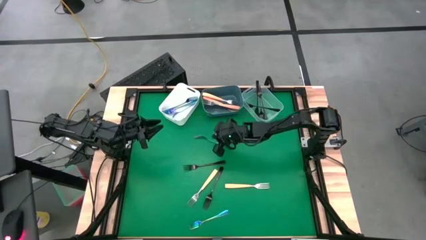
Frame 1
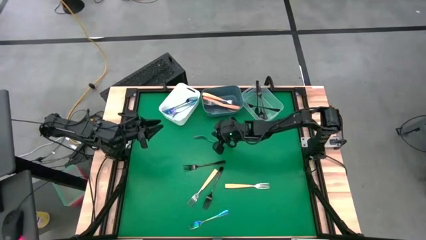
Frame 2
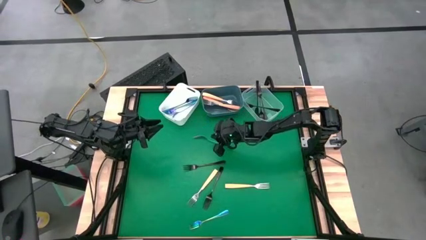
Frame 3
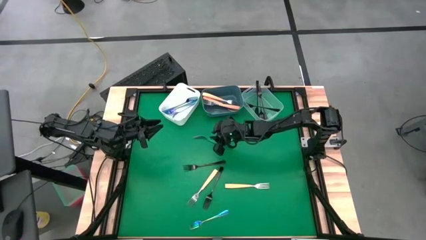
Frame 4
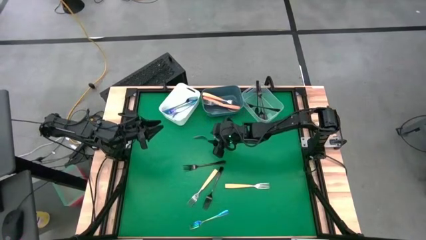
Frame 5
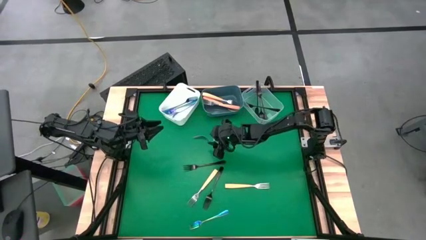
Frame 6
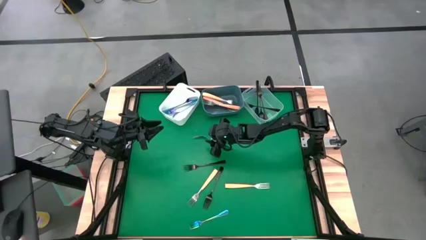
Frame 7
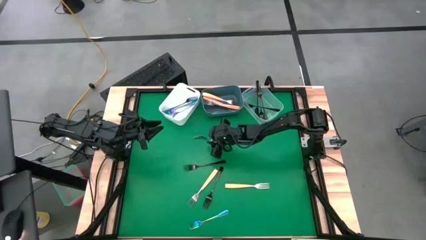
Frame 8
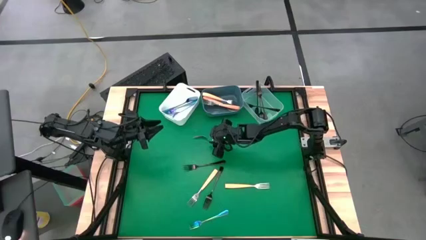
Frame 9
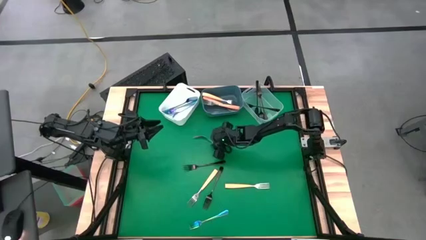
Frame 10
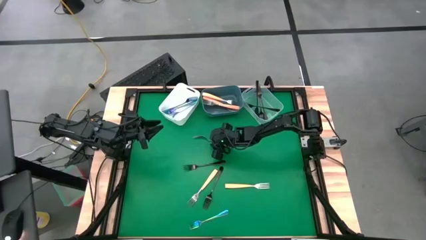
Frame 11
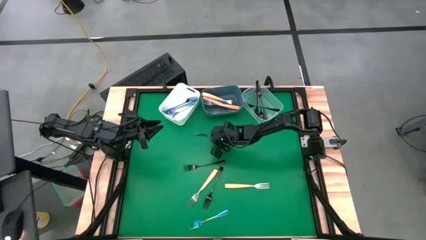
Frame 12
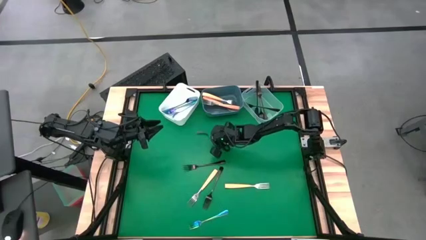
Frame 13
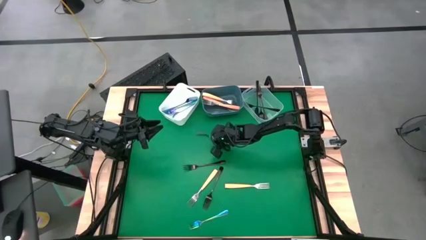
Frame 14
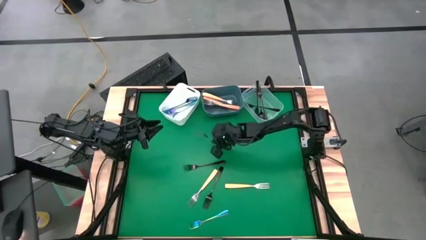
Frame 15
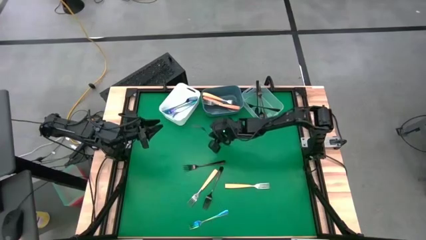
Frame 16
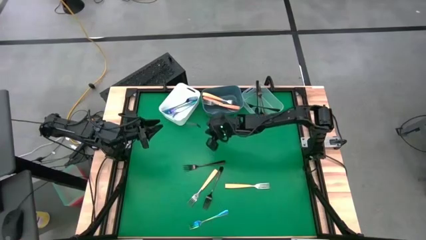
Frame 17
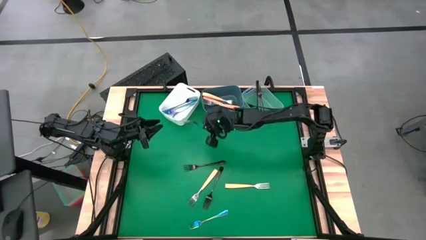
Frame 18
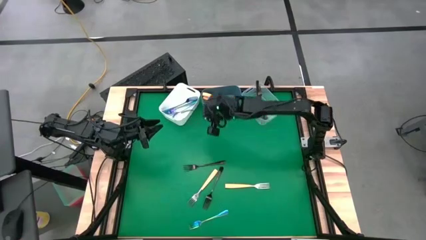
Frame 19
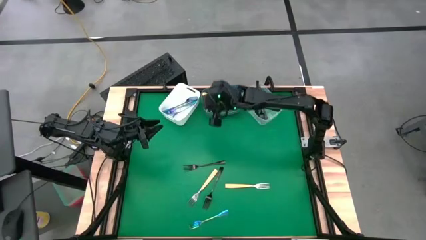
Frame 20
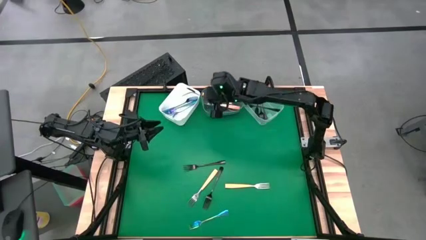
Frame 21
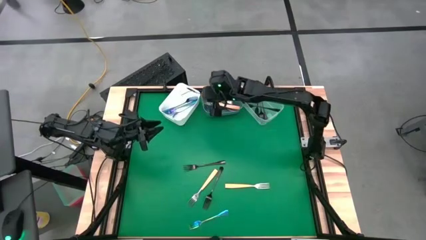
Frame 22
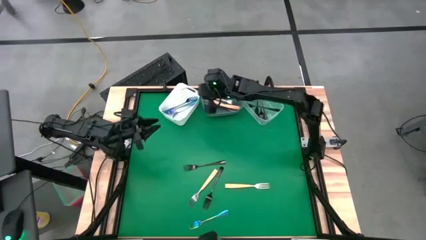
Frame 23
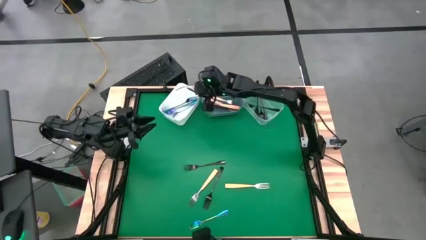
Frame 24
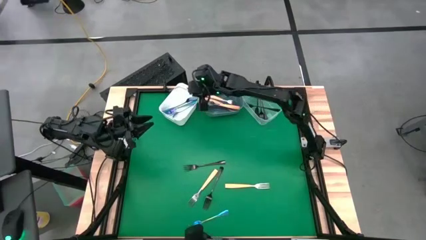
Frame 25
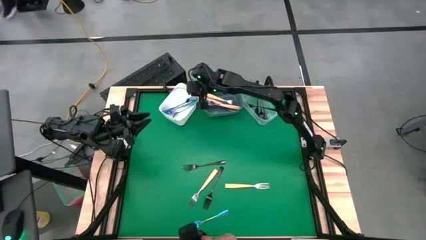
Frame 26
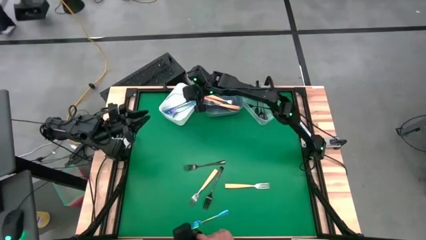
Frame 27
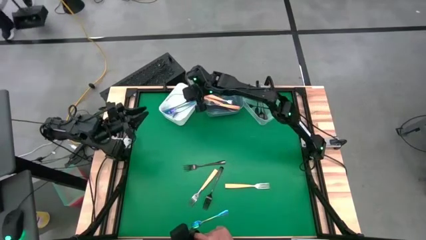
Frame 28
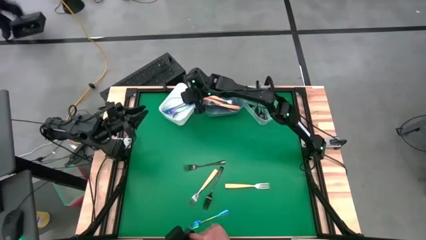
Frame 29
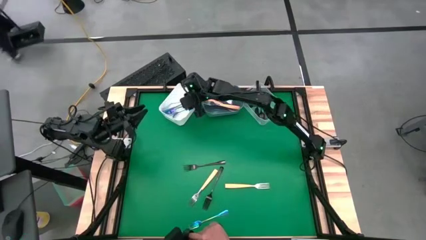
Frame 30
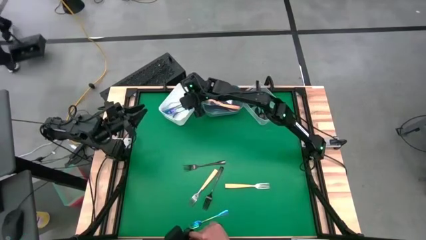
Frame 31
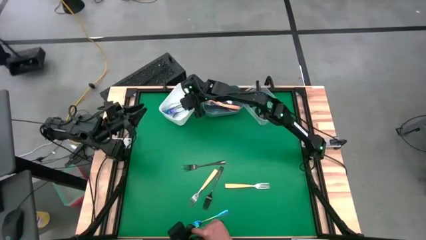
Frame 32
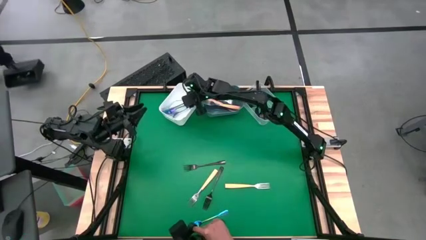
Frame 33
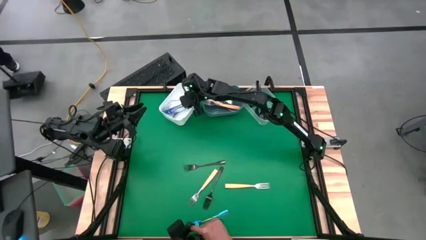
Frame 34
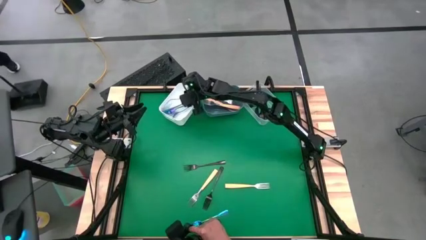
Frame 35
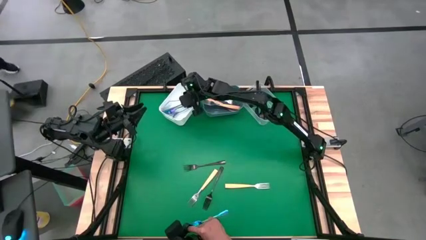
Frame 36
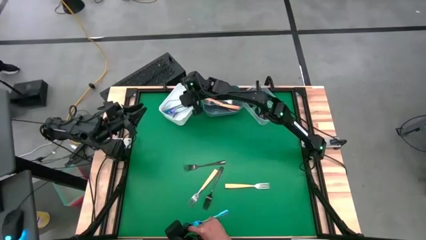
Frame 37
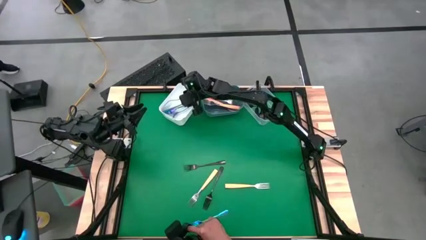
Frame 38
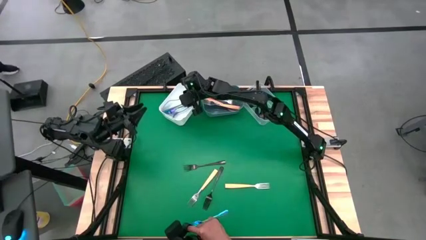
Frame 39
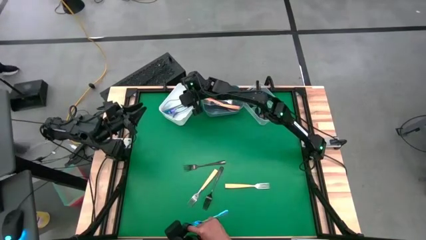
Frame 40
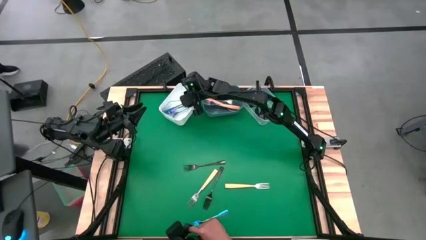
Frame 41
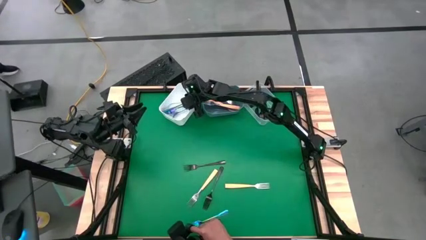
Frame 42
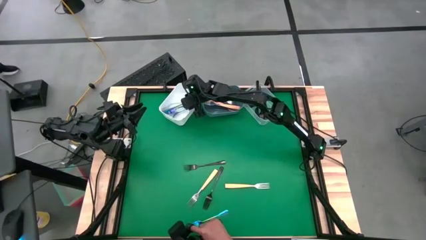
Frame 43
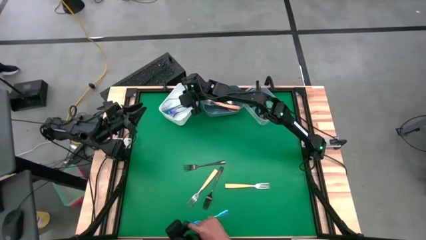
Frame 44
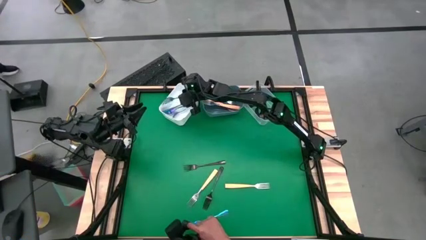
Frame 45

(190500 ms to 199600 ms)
Task: Sort silverware by color (type)
Put the blue fork into the white bin

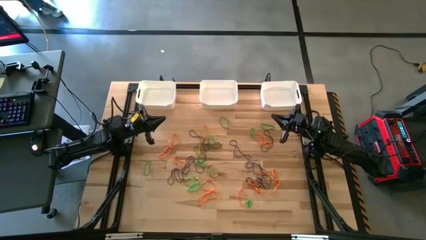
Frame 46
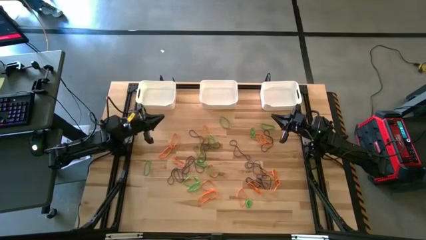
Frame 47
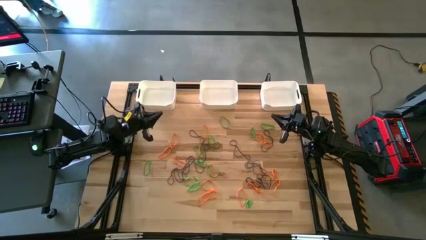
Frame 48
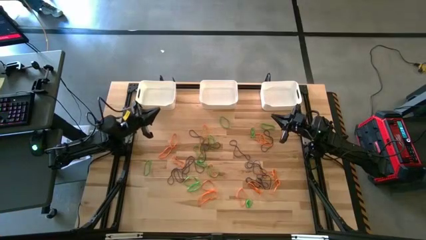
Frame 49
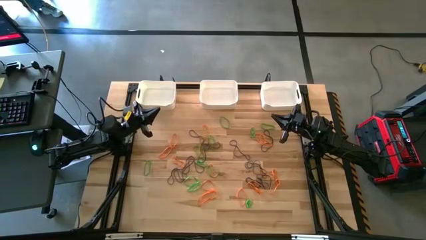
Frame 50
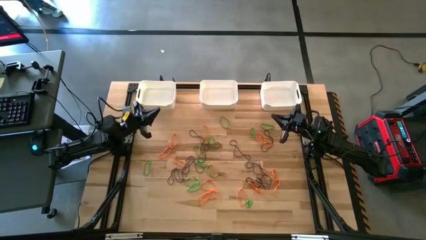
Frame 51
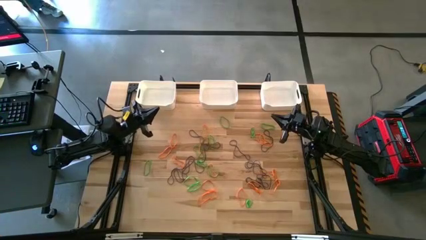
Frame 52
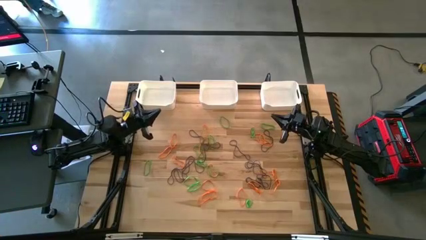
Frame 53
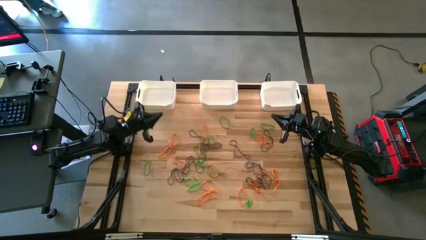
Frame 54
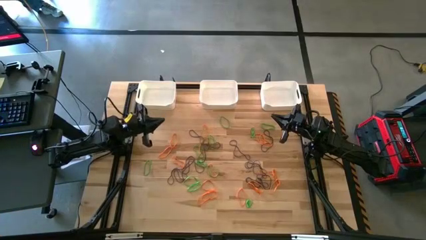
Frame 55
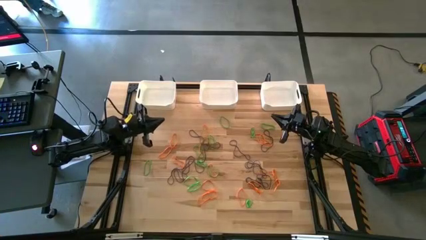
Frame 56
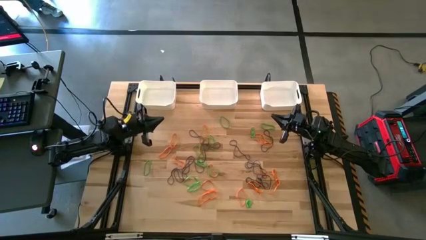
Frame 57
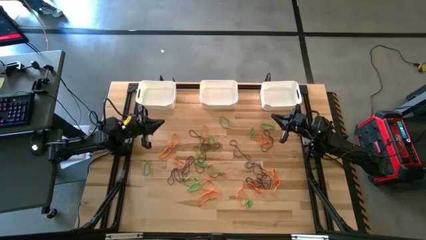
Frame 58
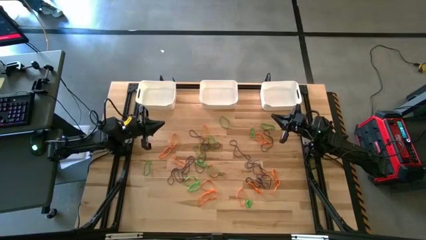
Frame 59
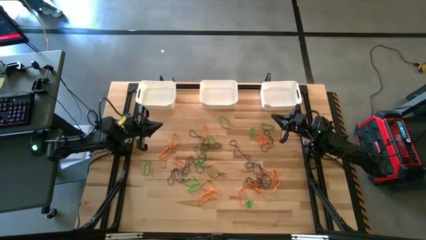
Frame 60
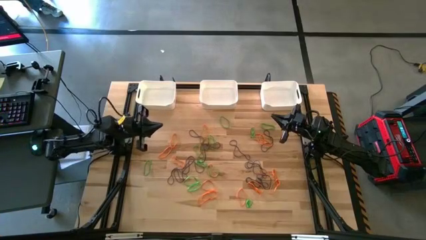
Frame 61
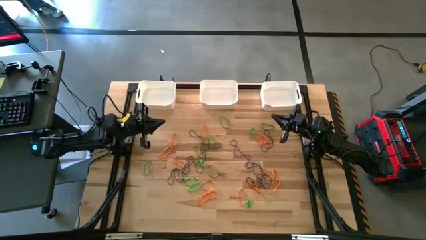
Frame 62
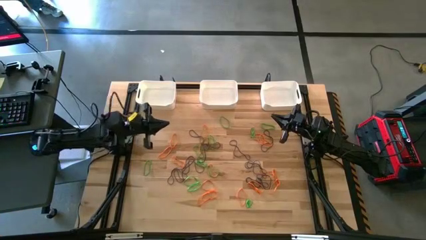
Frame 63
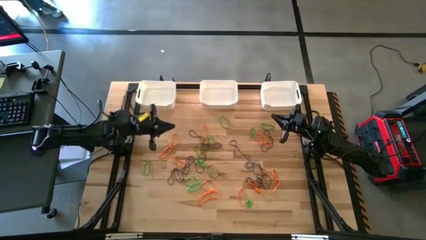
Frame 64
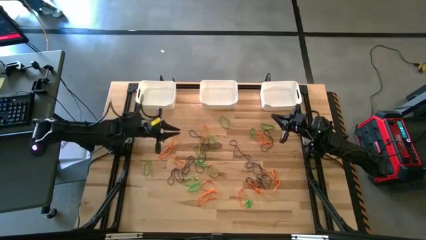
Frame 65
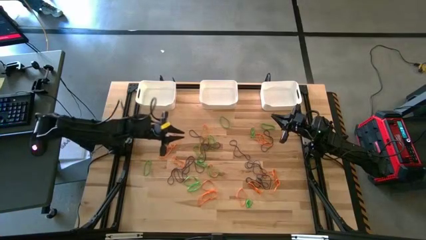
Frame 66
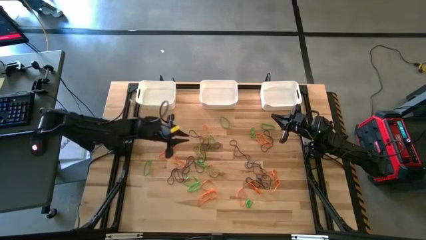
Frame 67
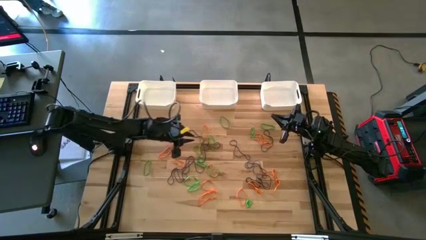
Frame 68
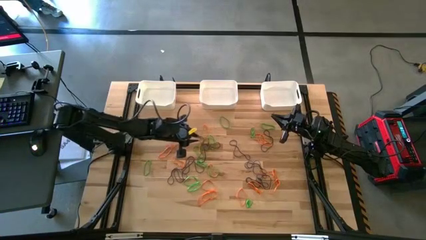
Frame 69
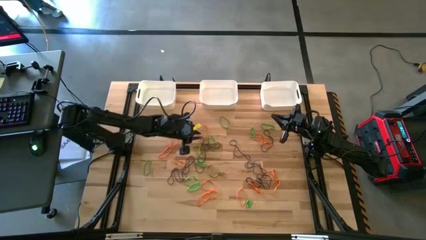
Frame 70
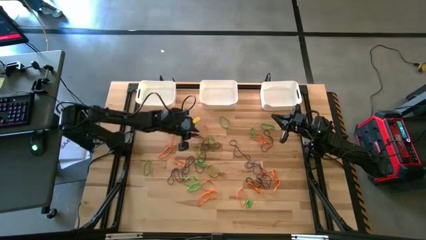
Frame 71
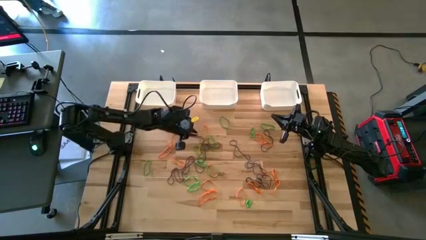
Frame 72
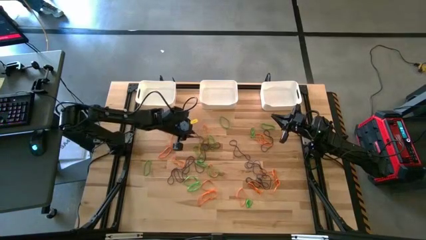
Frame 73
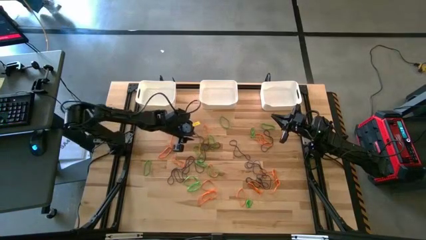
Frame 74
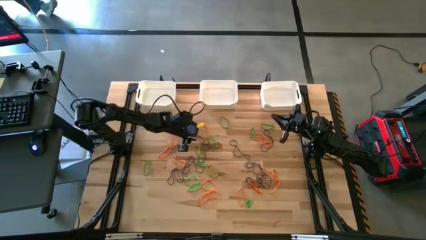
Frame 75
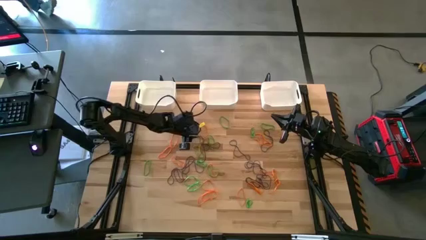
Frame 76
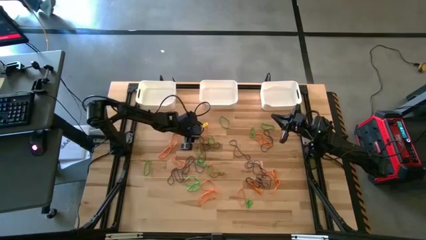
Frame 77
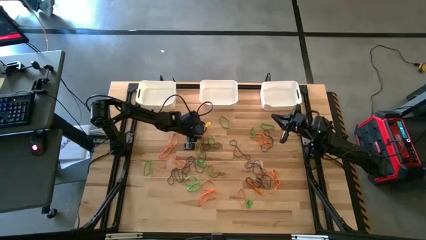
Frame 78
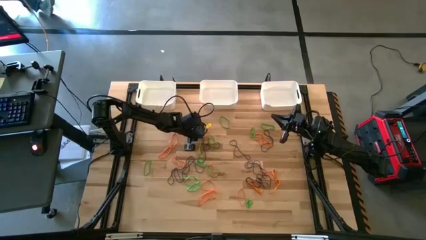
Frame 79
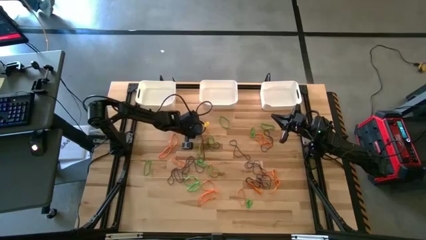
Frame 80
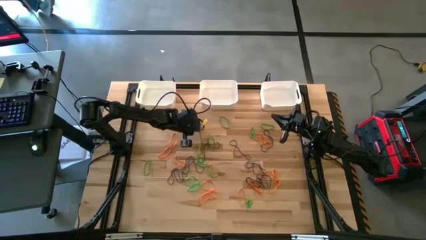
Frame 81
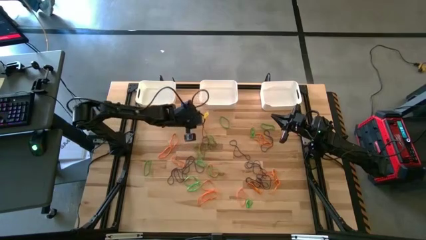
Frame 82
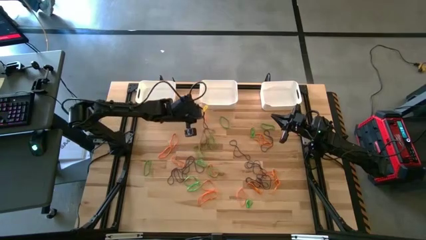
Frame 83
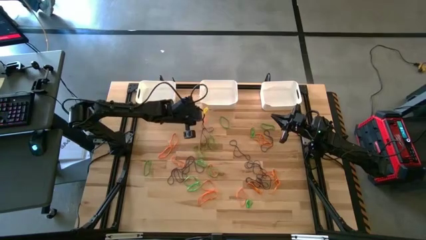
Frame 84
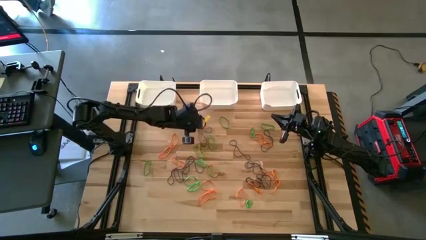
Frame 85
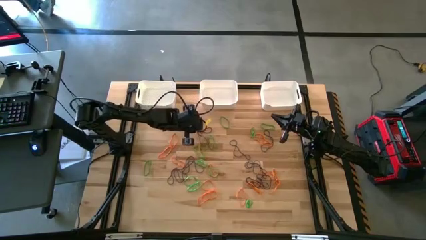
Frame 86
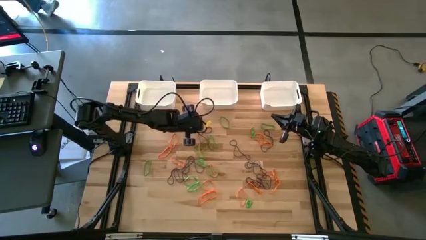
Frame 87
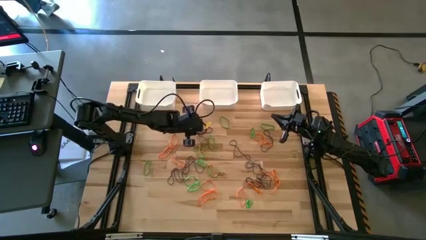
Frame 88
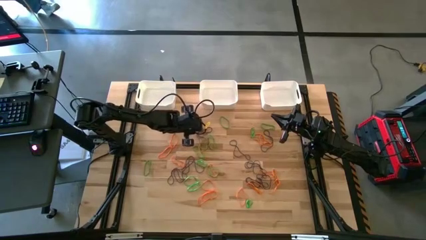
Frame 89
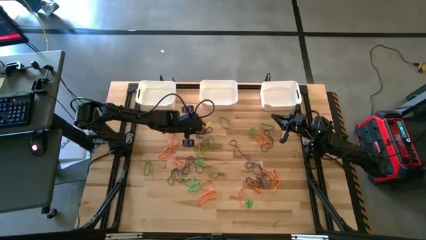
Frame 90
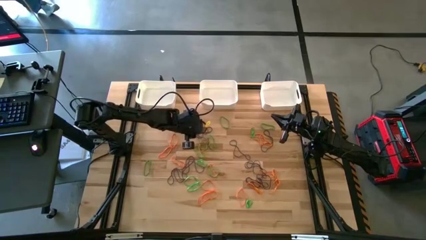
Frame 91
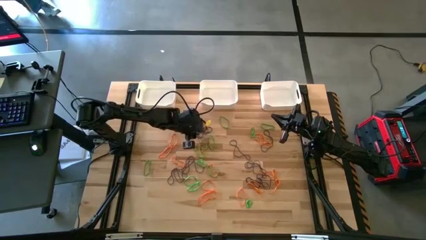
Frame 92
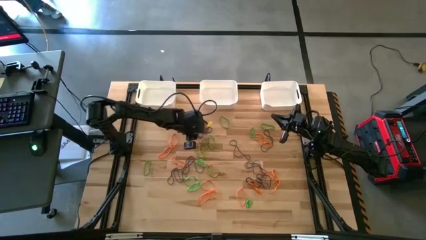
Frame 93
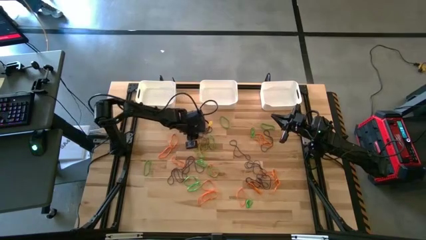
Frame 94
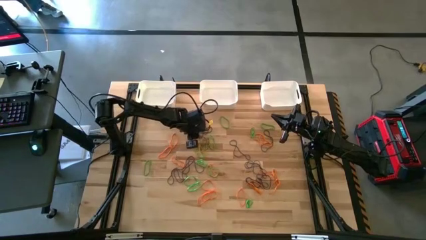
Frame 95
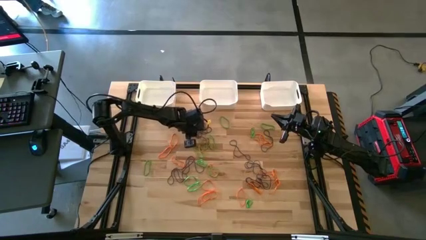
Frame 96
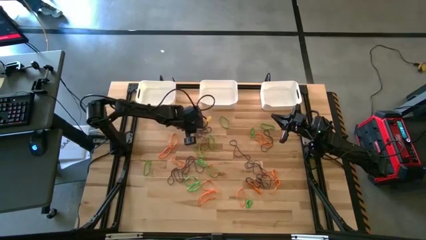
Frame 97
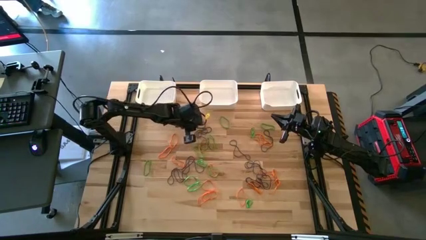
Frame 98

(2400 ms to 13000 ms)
Task: Sort rubber bands into baskets
Put the purple rubber band into the middle white bin
